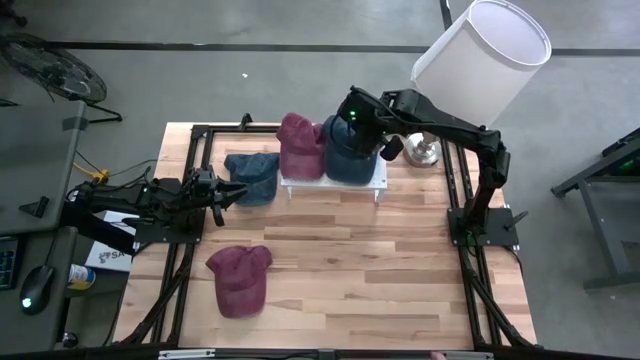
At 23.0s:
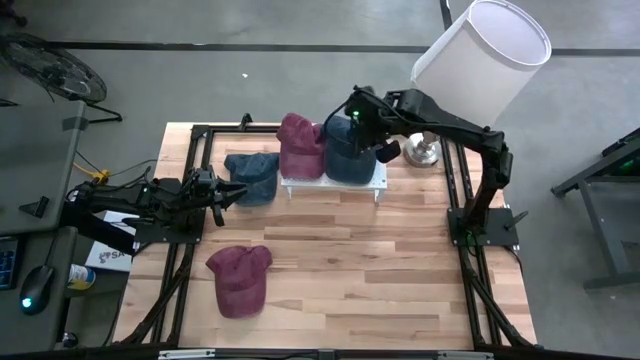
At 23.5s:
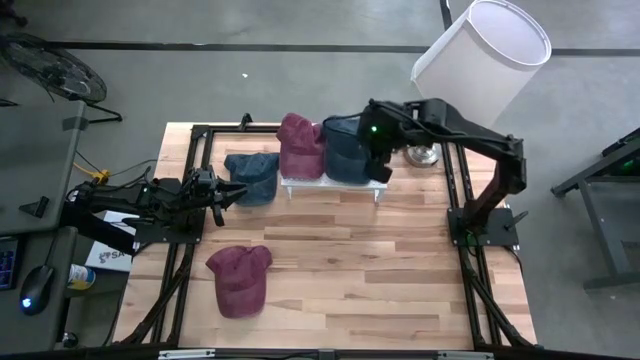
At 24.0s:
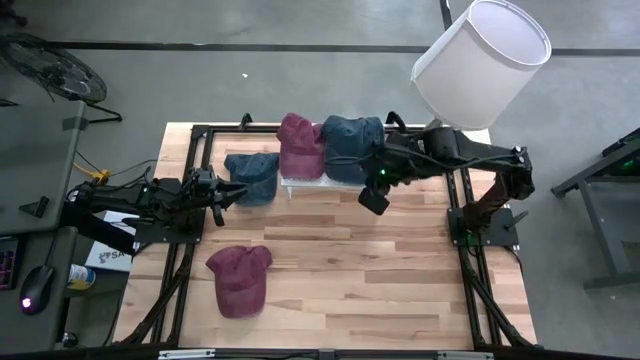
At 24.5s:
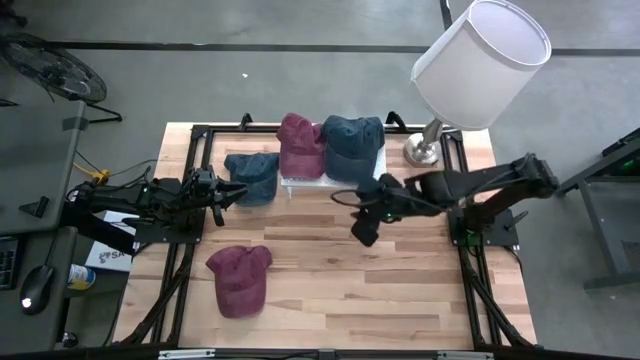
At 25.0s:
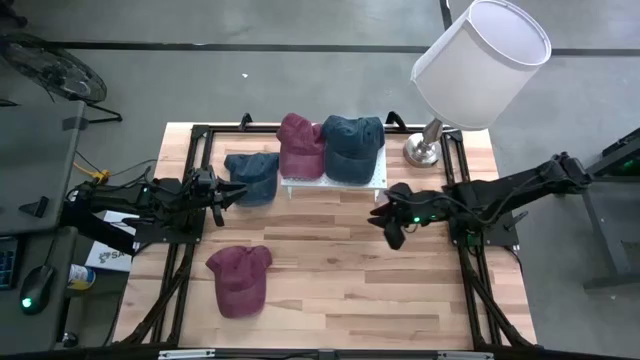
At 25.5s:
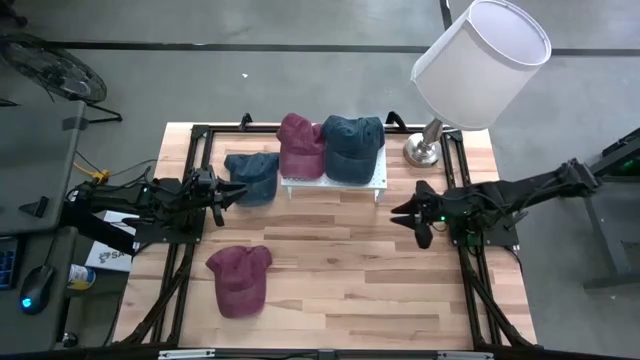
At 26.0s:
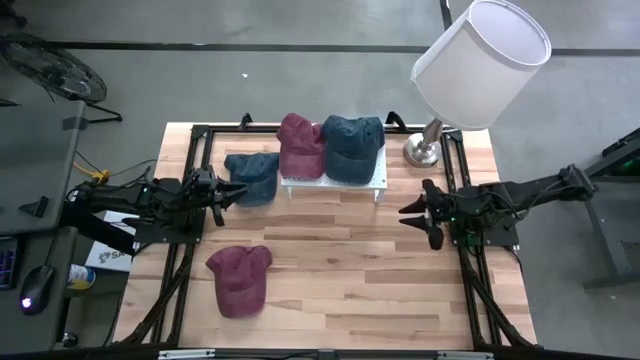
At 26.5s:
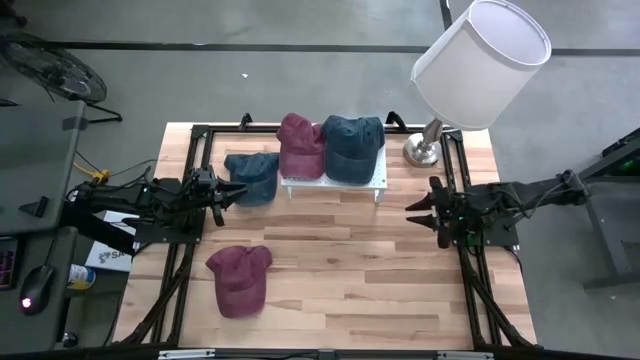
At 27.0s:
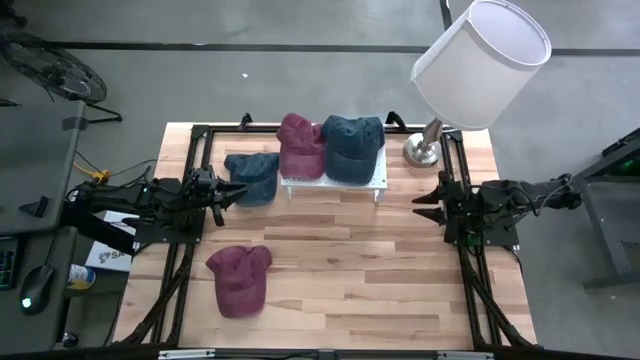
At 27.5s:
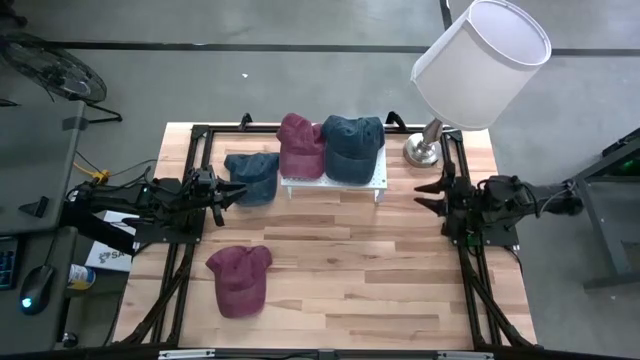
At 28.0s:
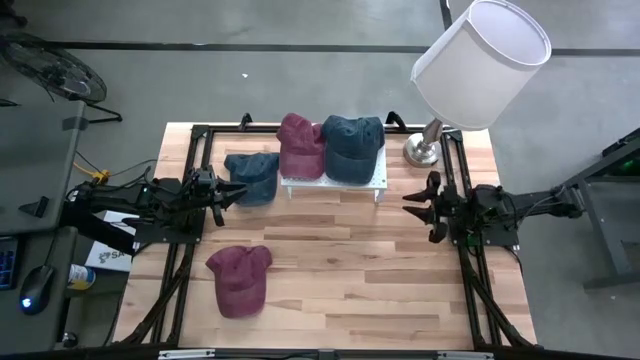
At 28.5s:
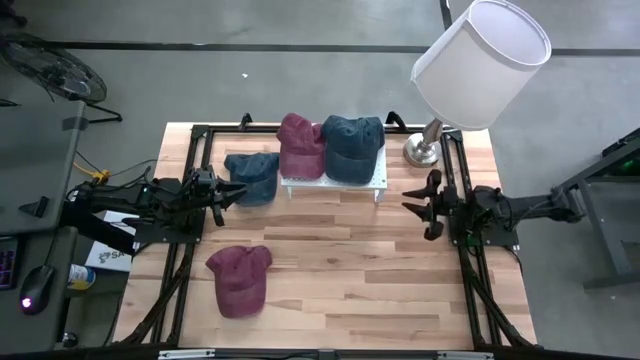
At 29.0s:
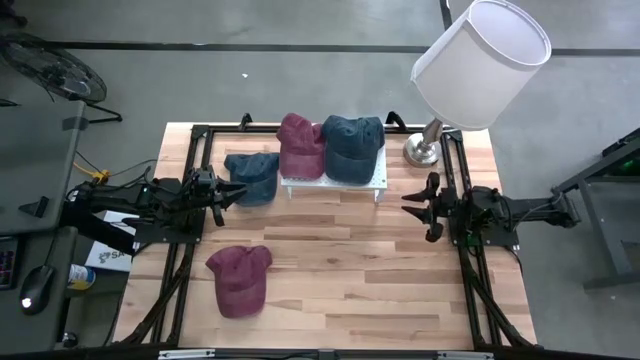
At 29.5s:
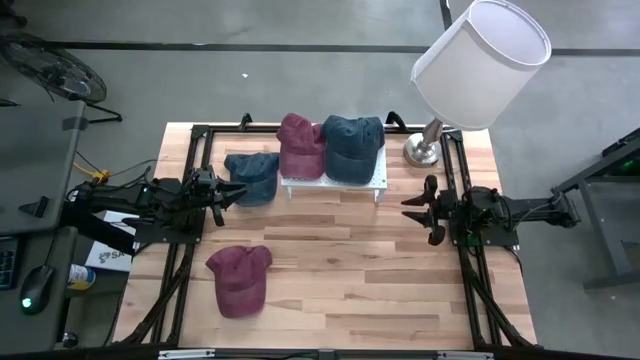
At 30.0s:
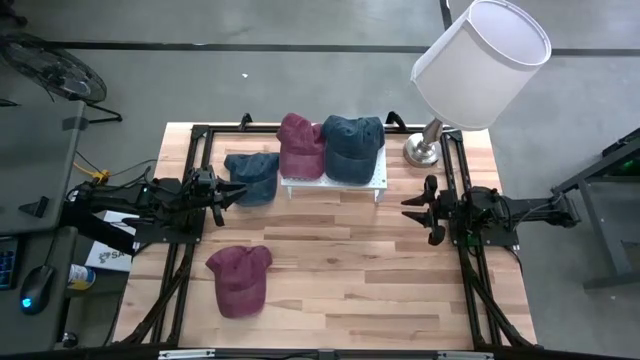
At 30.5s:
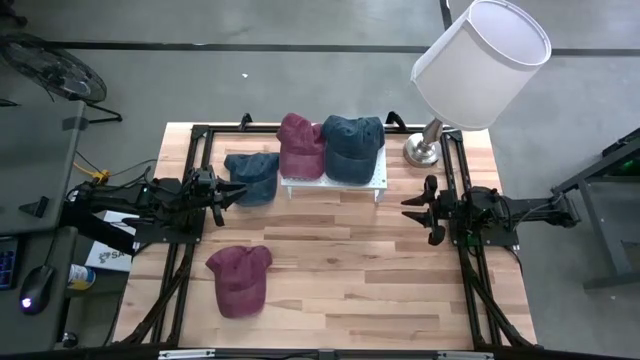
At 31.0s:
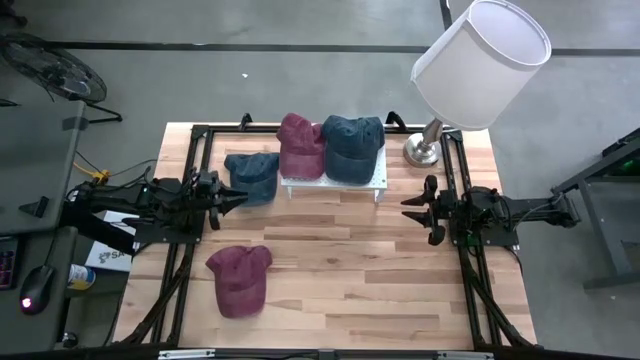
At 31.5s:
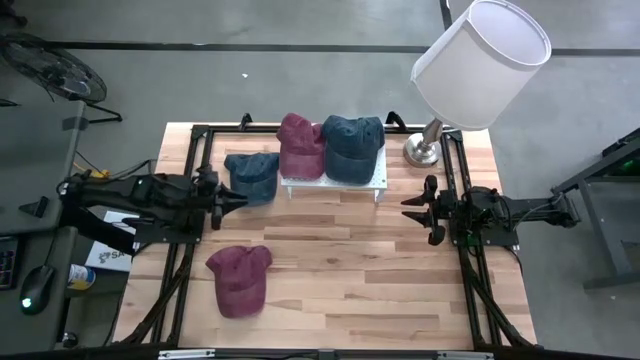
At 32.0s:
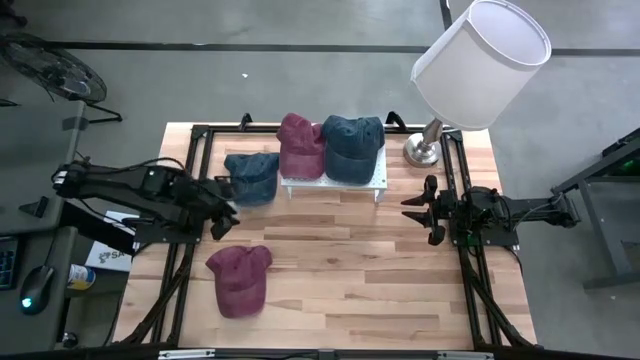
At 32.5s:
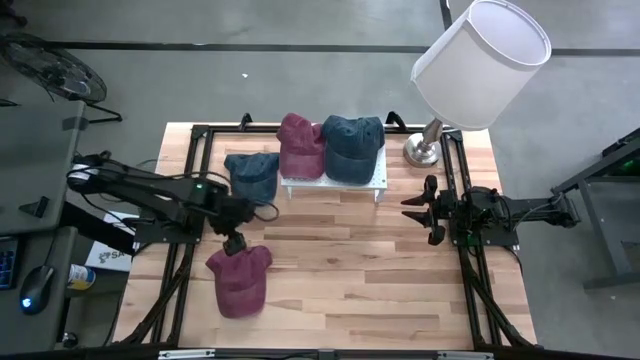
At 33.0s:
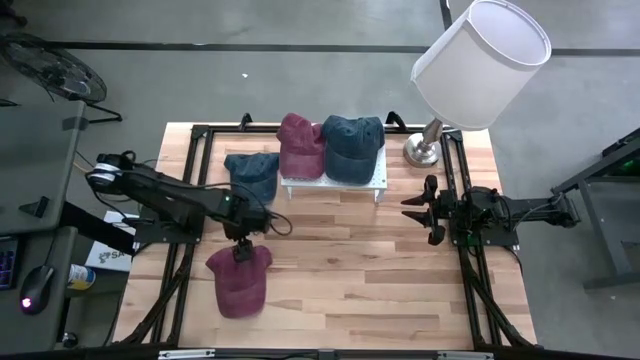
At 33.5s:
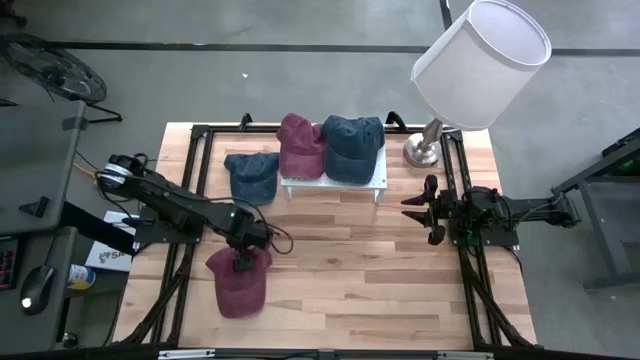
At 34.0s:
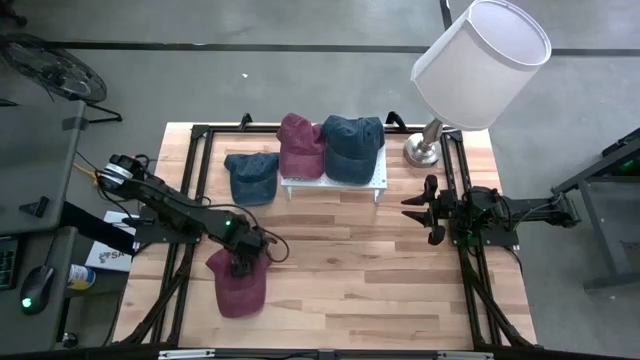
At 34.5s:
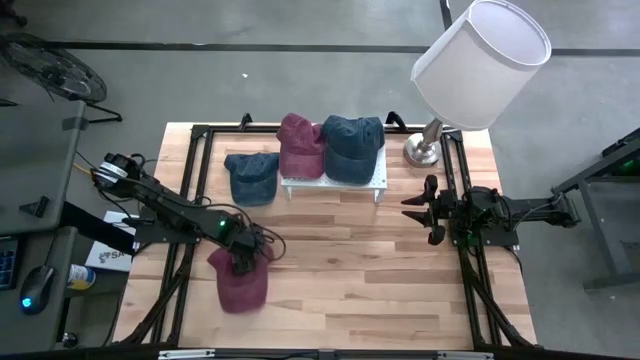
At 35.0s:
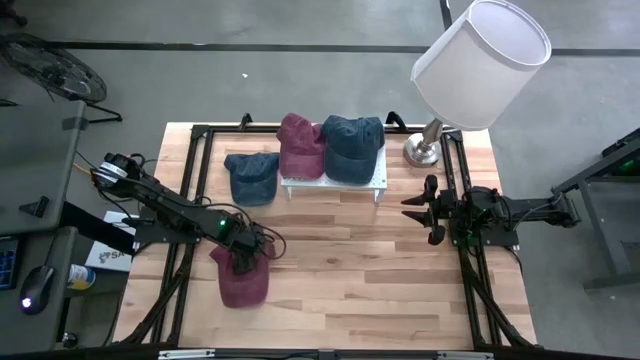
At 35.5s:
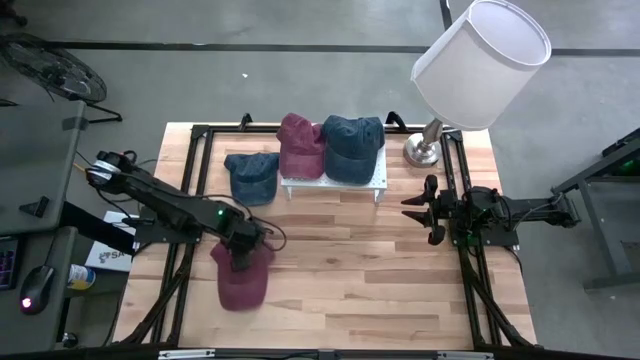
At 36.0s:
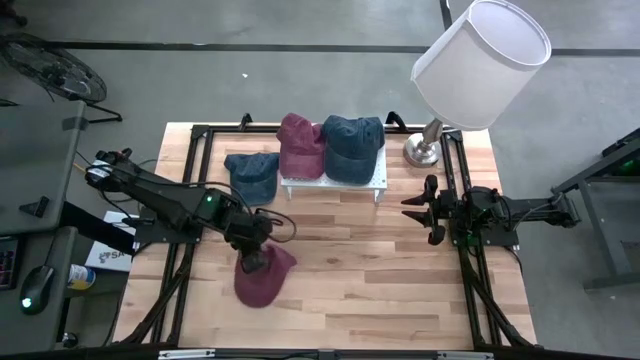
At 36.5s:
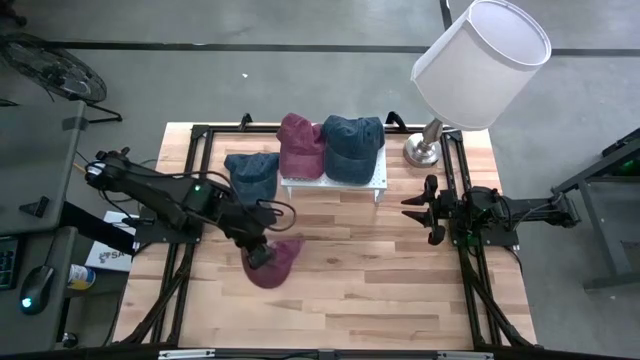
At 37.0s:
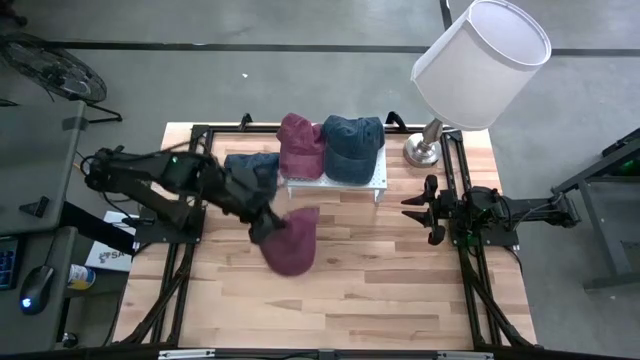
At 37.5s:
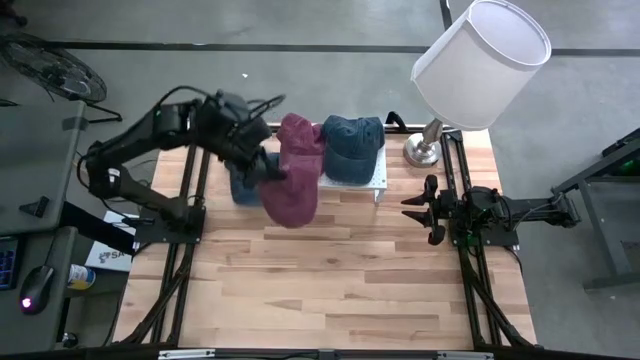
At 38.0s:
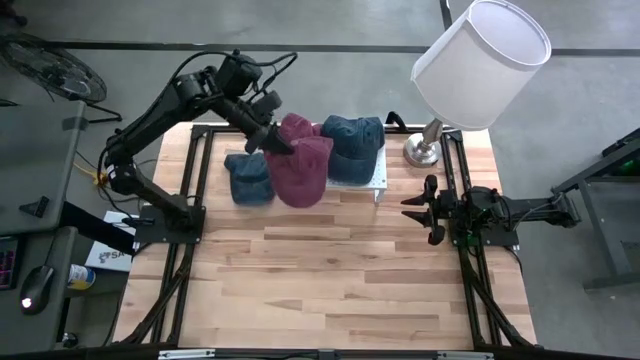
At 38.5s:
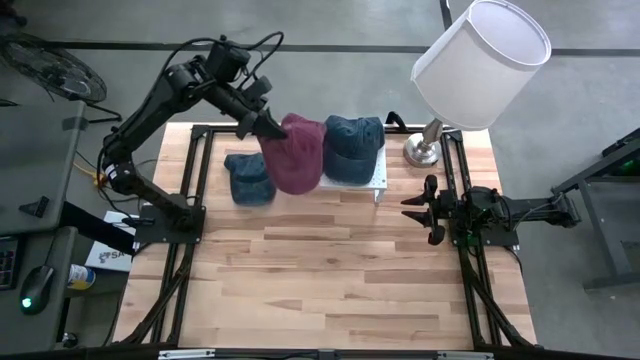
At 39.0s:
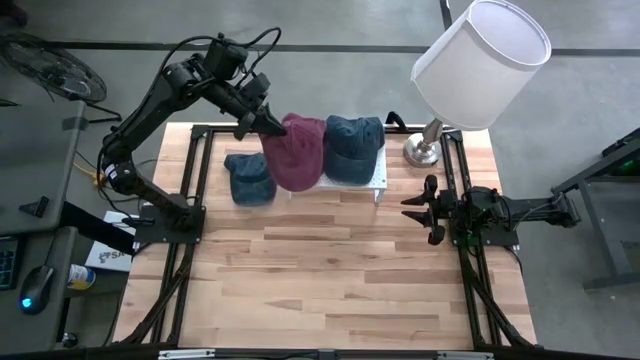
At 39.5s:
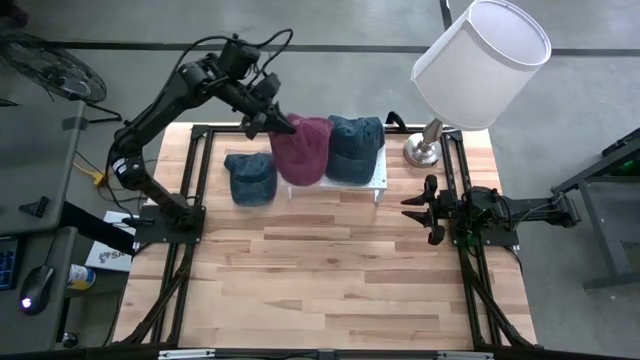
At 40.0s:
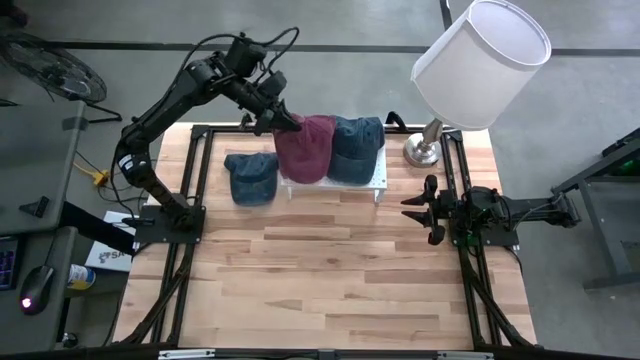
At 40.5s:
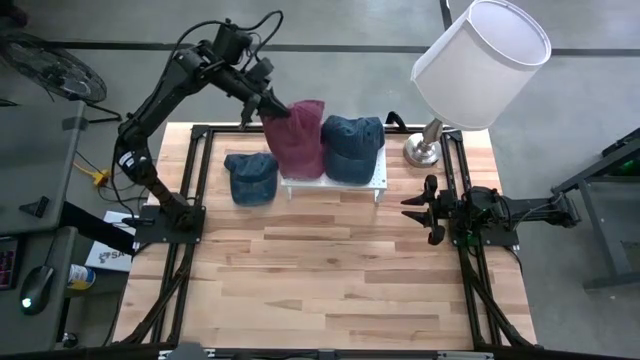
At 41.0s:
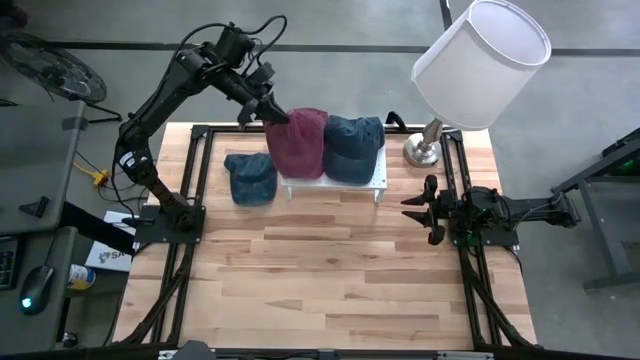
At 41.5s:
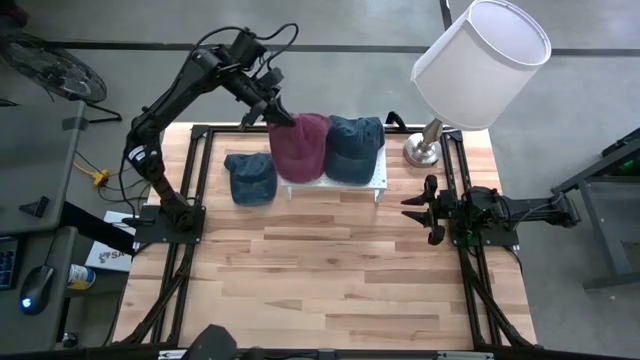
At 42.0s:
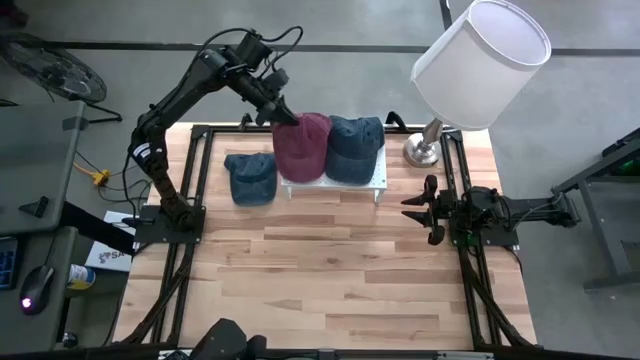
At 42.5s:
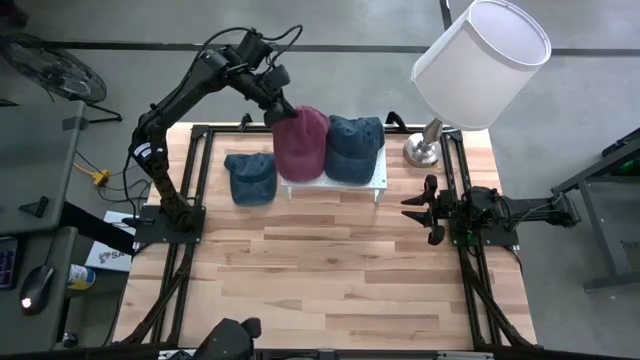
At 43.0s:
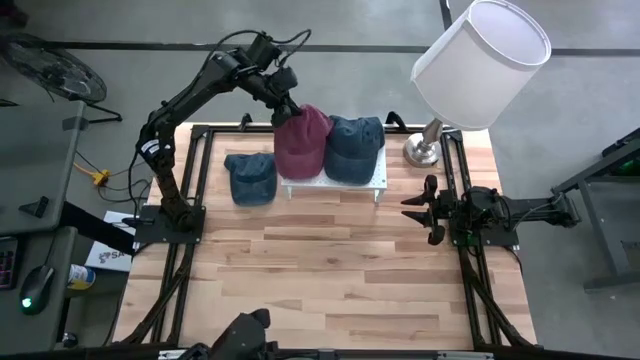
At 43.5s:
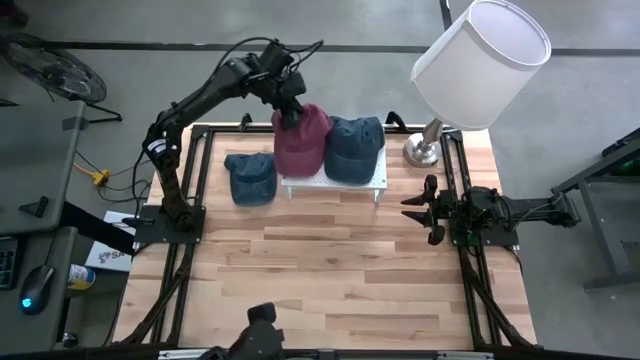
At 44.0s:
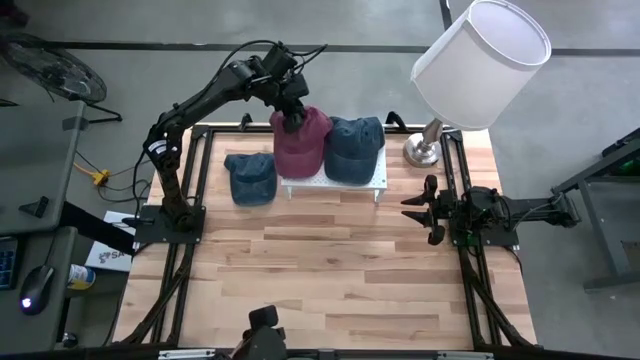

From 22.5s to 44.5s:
Task: Pick & Place hat
Stack the red cap on top of the red cap on the shelf
